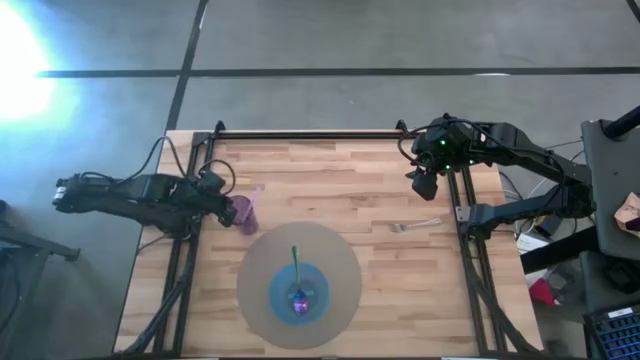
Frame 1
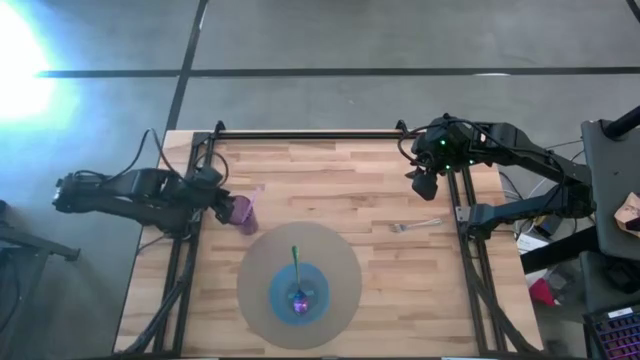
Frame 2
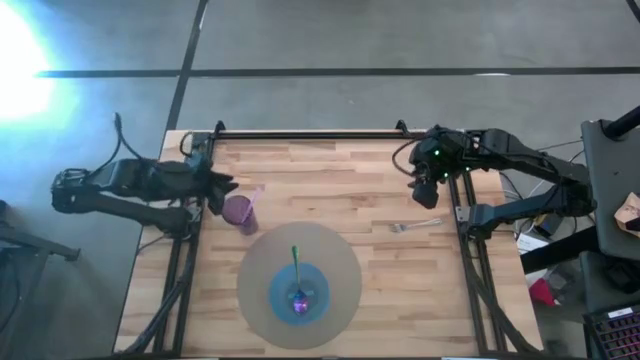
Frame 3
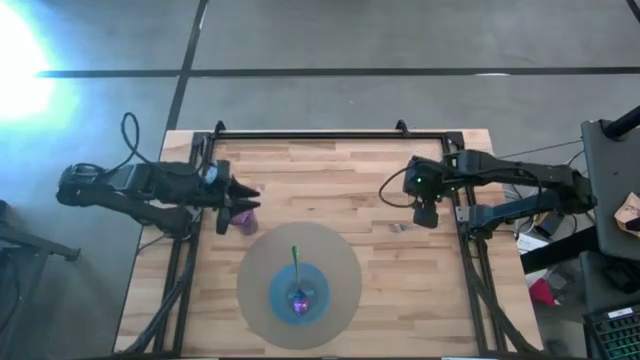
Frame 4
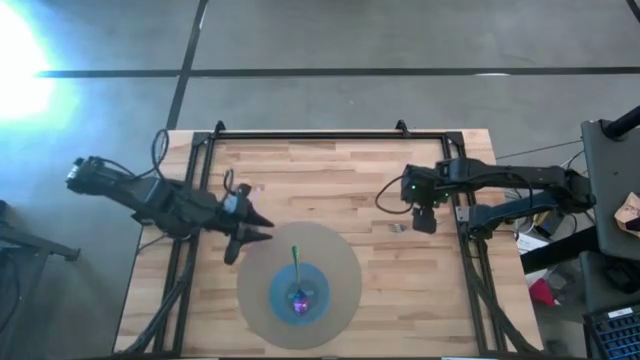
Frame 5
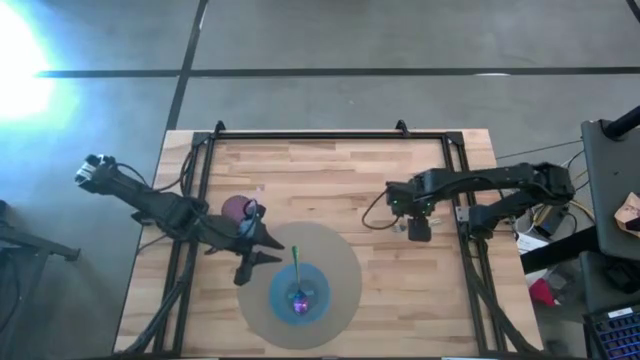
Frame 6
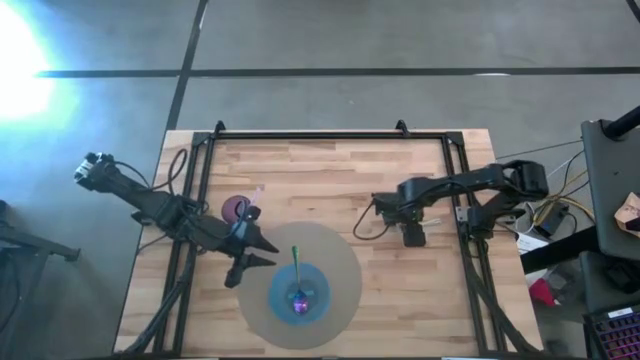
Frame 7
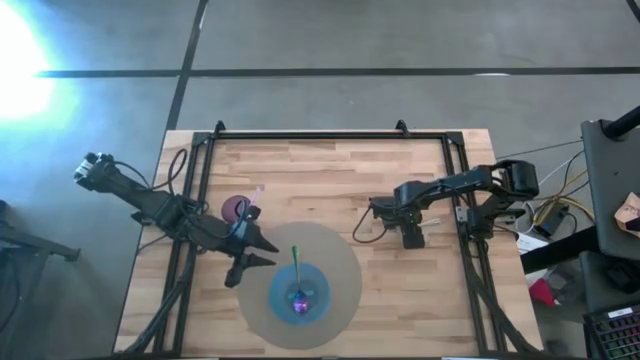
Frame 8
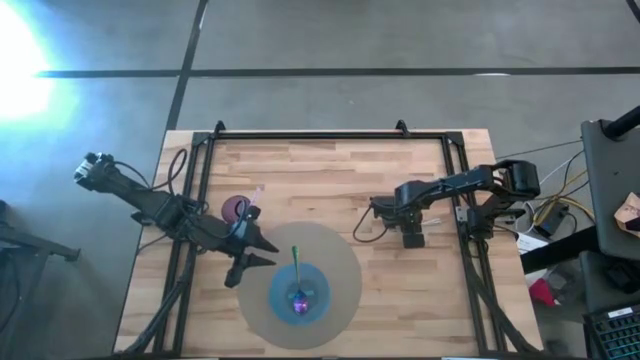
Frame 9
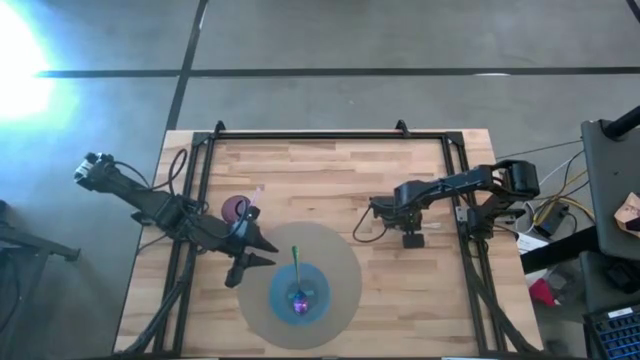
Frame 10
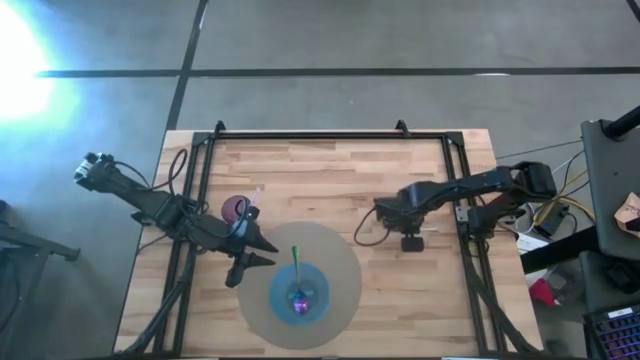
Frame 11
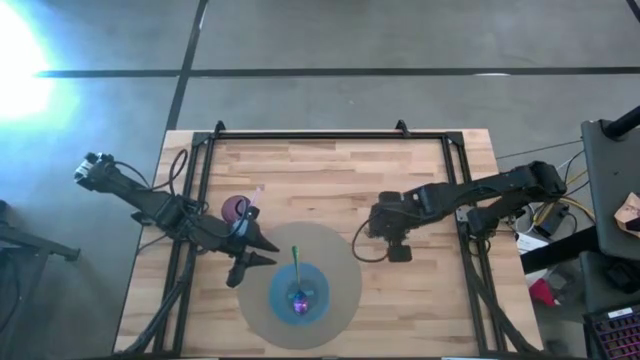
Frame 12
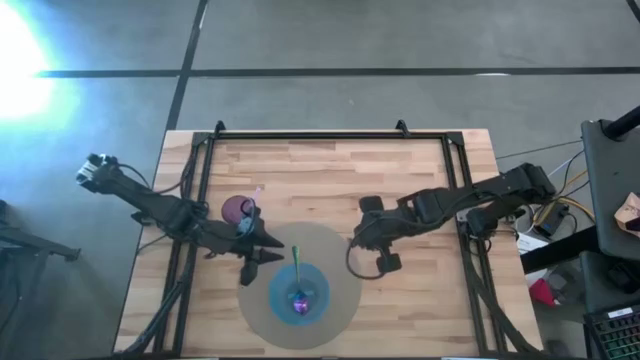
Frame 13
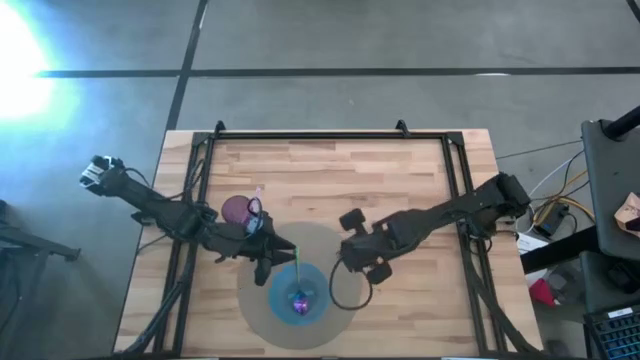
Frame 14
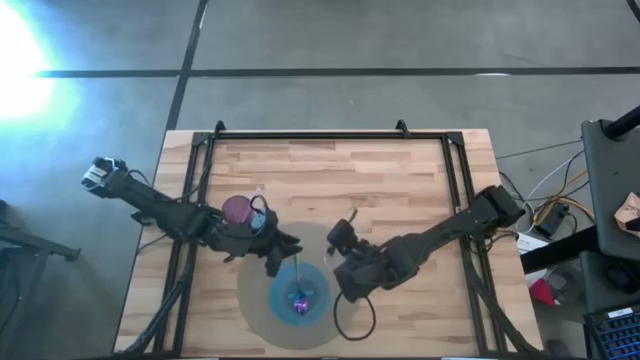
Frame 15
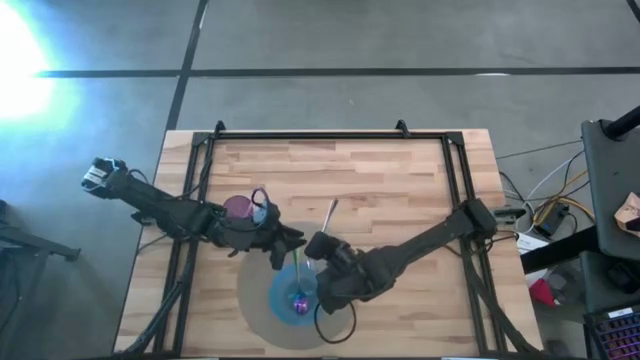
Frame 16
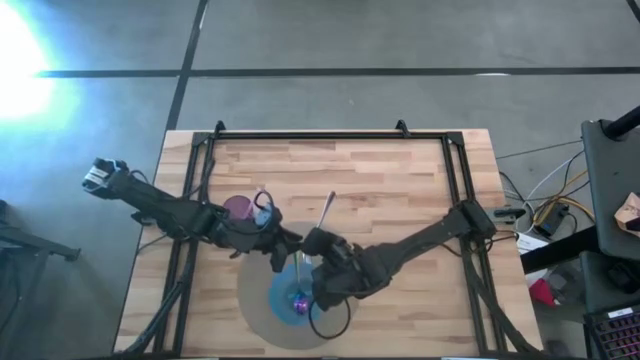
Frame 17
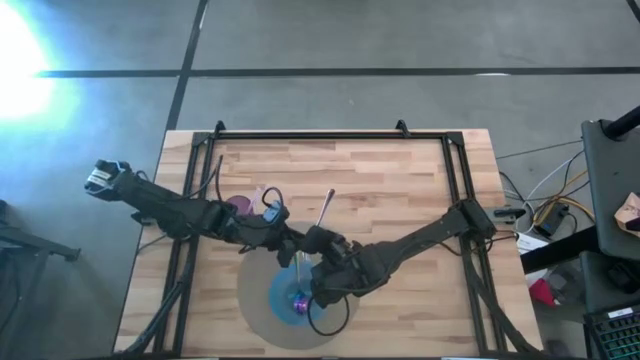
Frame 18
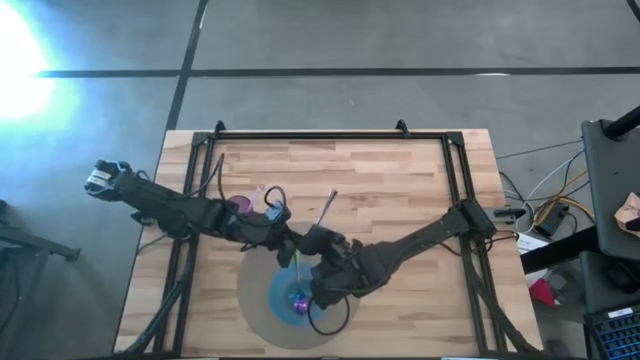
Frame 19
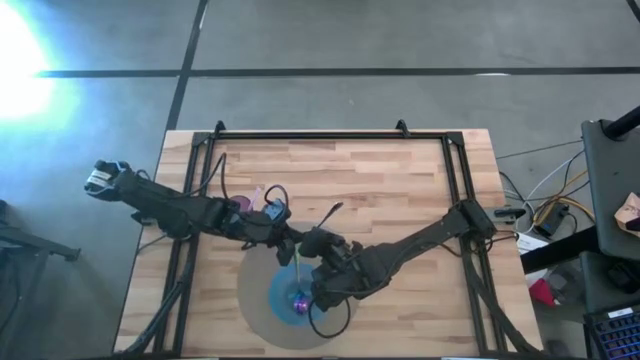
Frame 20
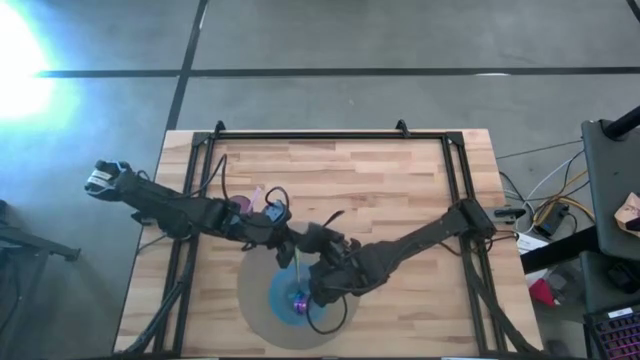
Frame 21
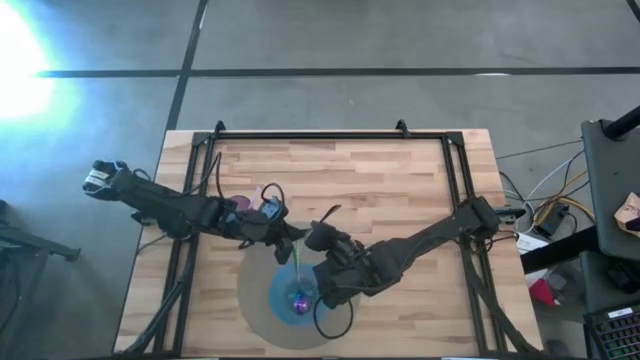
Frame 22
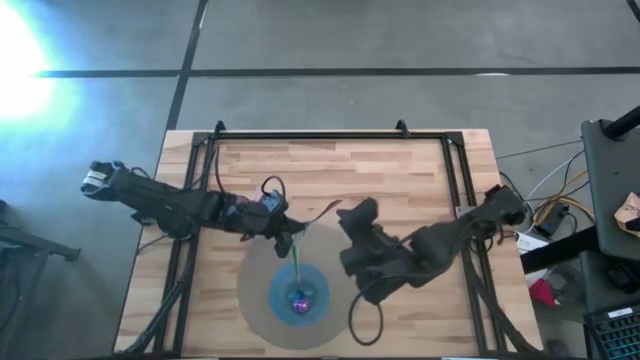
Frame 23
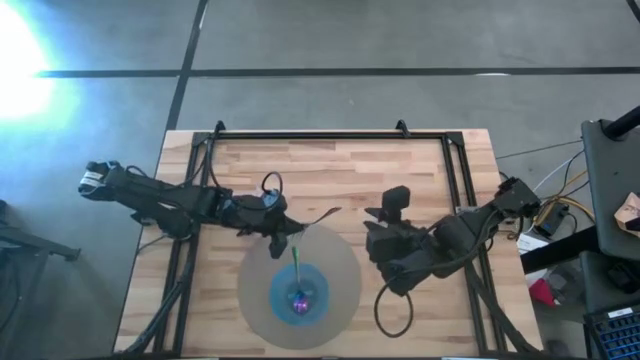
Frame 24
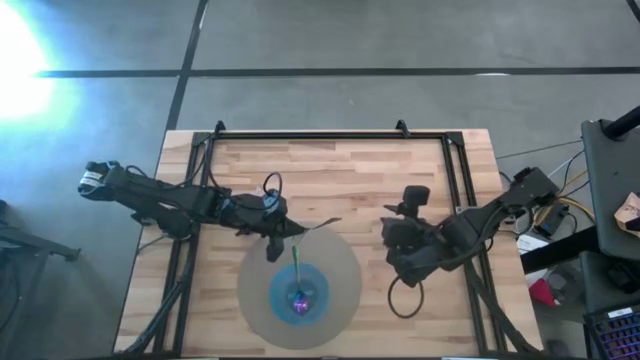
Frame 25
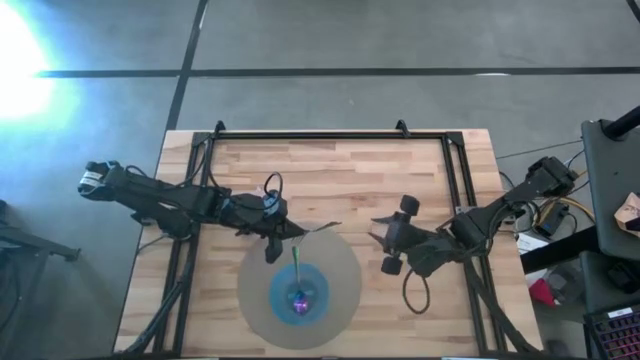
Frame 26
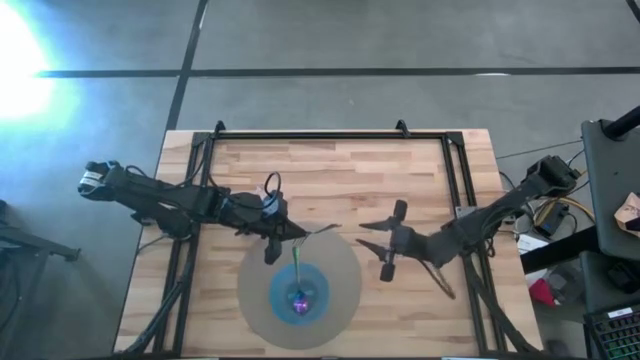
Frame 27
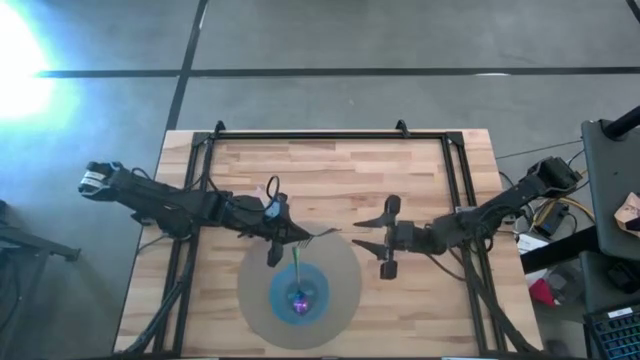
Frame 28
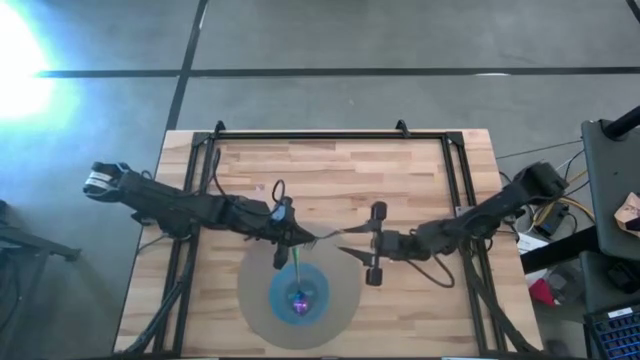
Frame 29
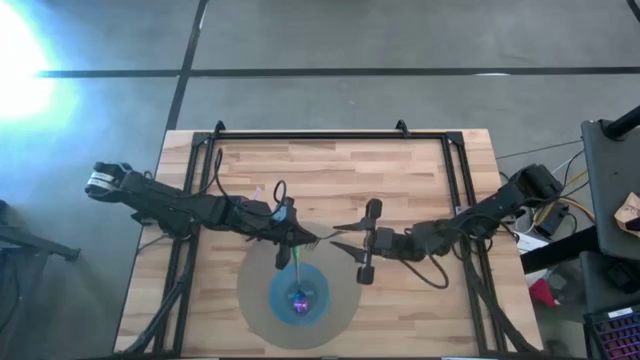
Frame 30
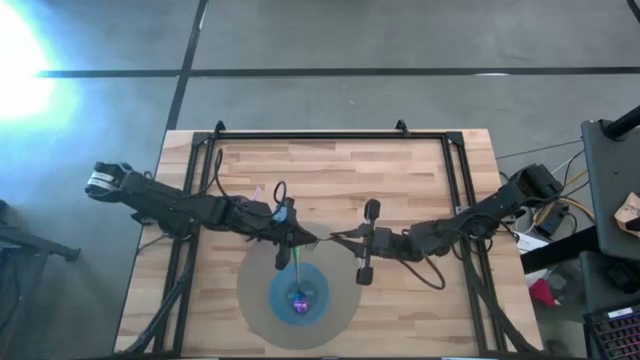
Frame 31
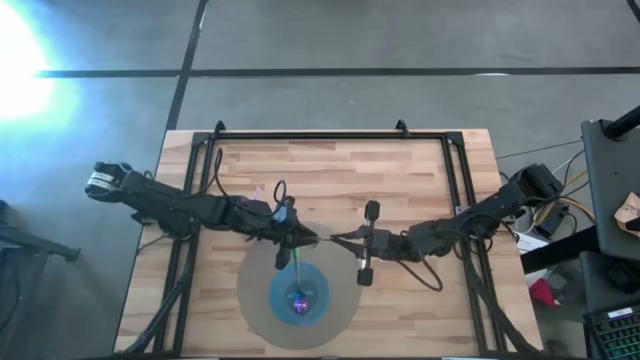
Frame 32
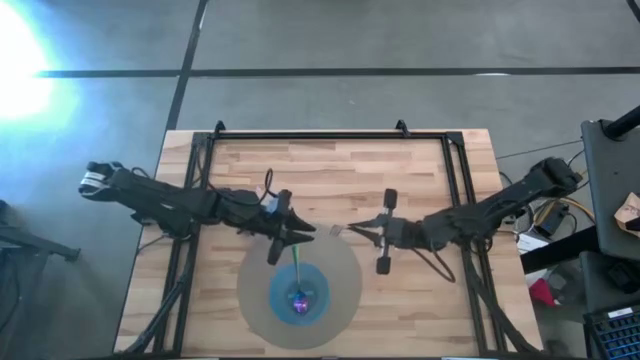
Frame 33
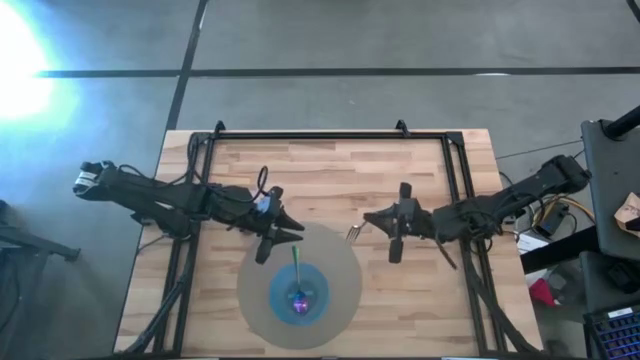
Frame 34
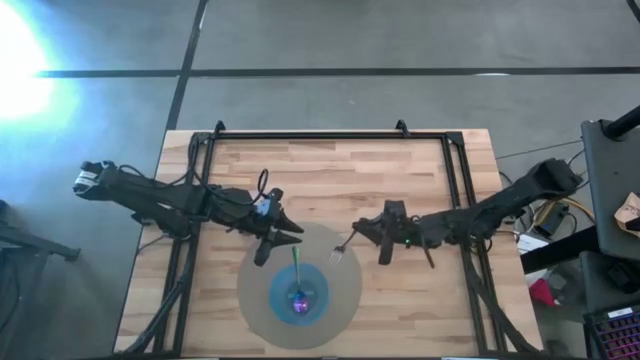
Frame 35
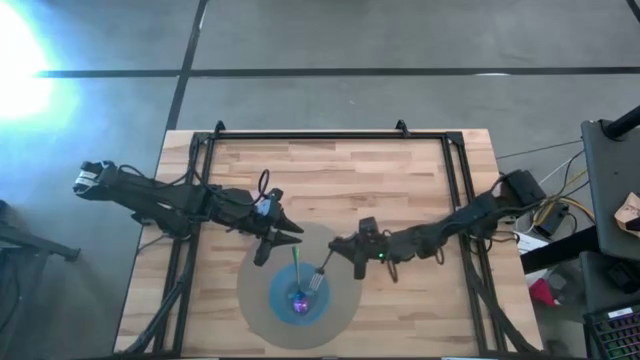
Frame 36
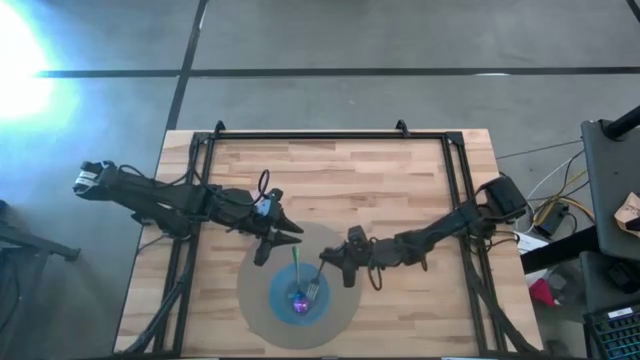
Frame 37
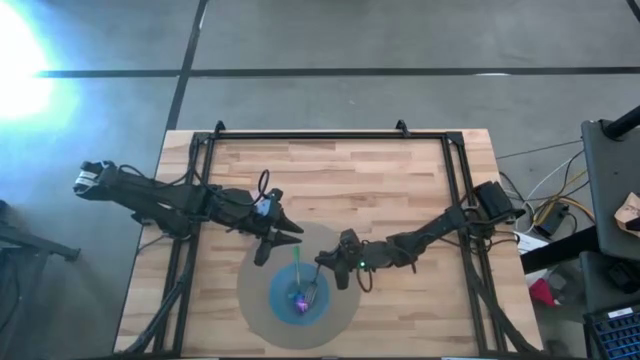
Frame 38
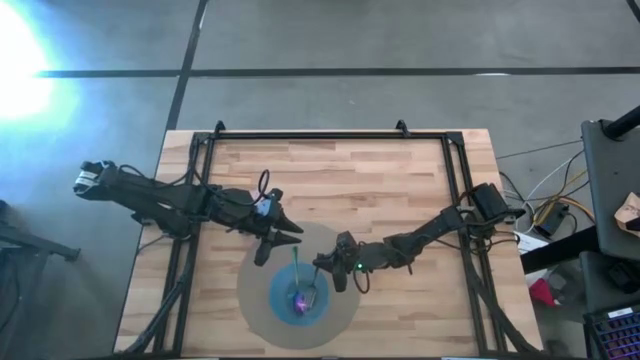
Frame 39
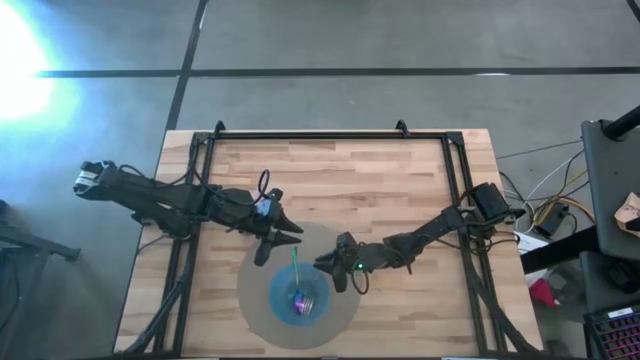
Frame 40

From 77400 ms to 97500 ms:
Task: Pick & Place Utensil
Put the silver fork into the blue bowl

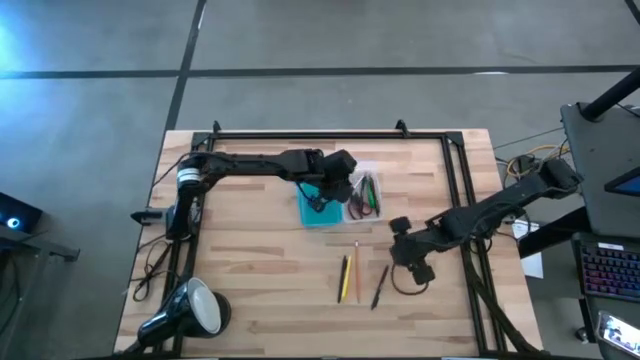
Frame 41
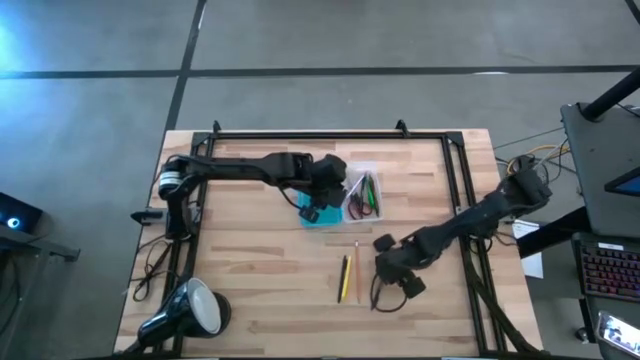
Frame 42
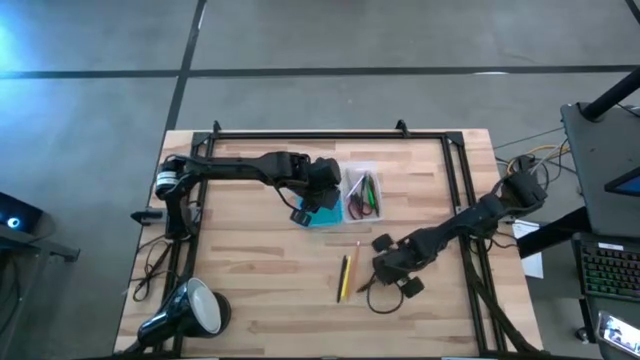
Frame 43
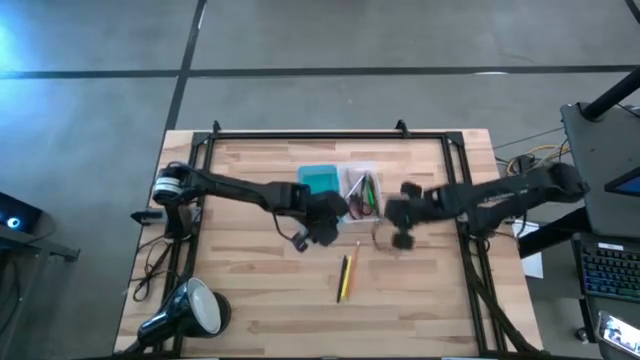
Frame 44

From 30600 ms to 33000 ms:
Task: Pick & place school supplies into a supply box
Put the black pen into the blue supply box
